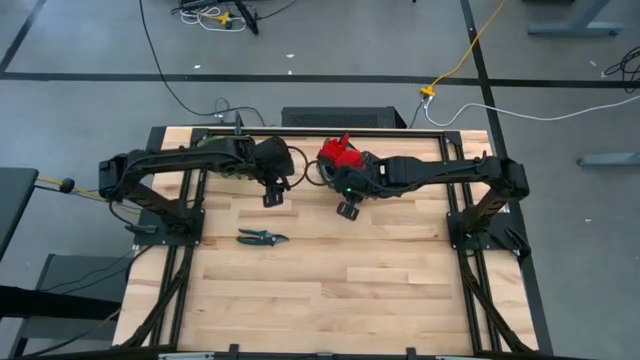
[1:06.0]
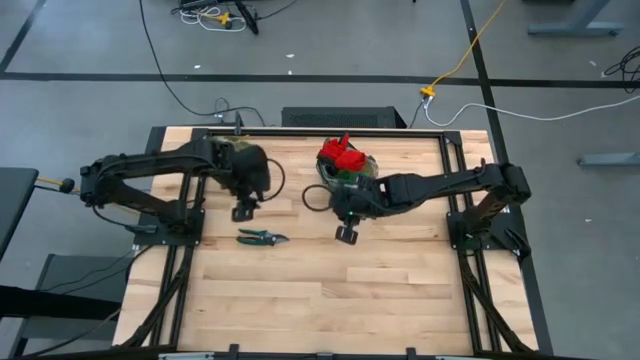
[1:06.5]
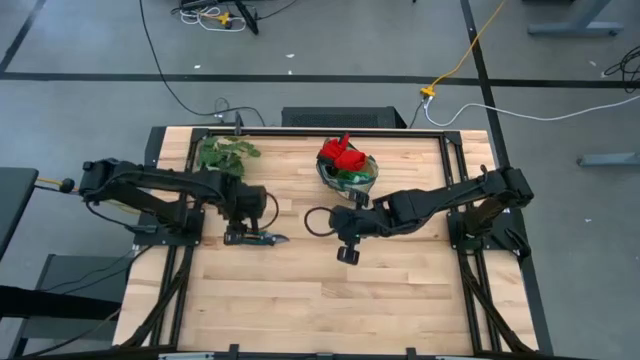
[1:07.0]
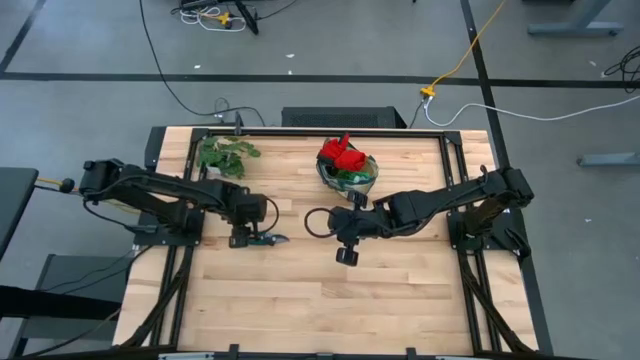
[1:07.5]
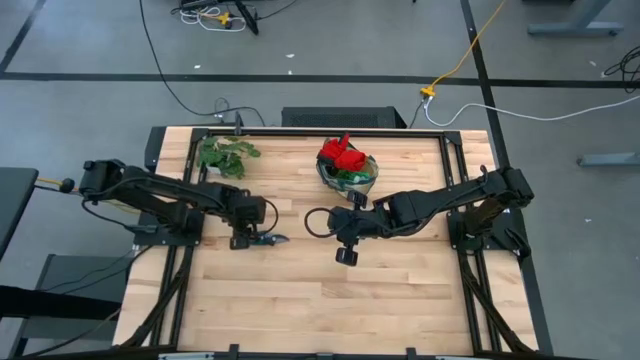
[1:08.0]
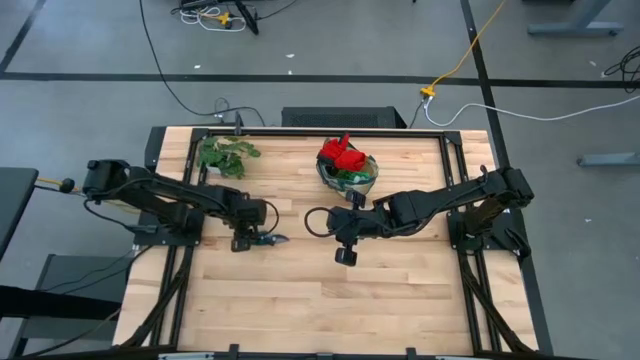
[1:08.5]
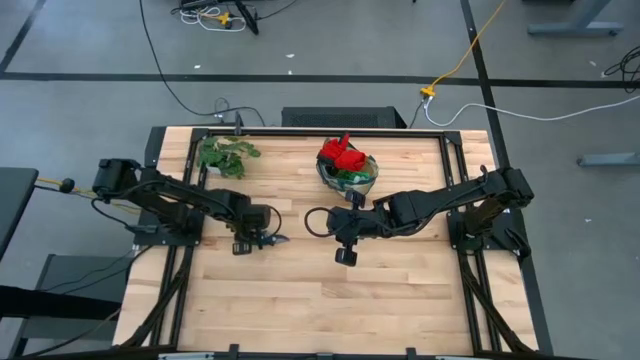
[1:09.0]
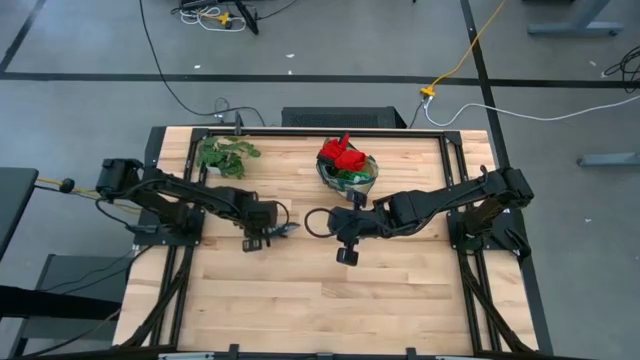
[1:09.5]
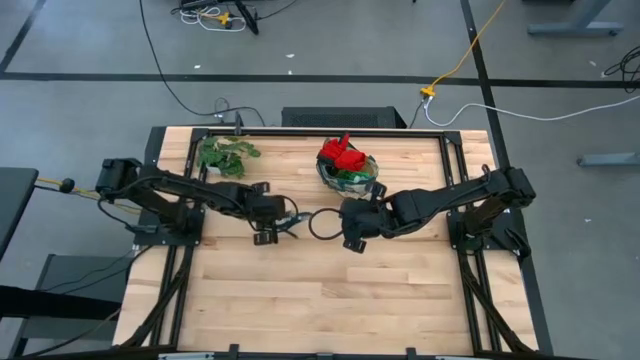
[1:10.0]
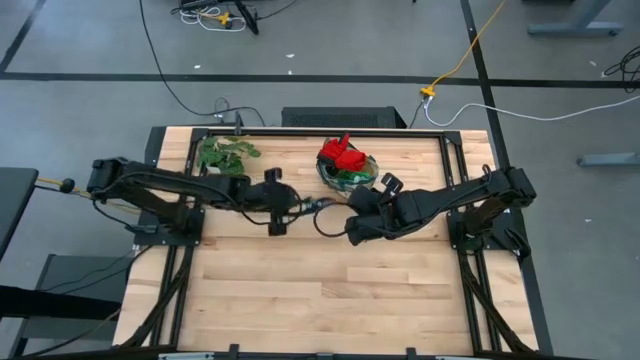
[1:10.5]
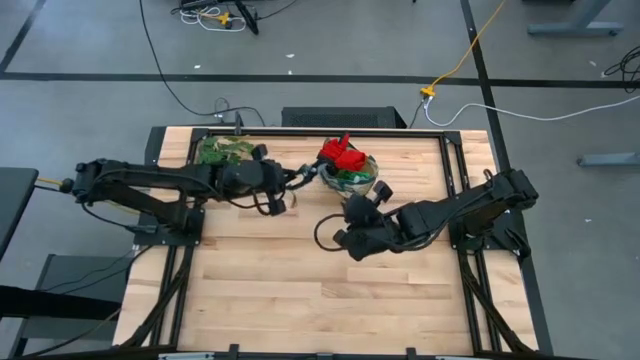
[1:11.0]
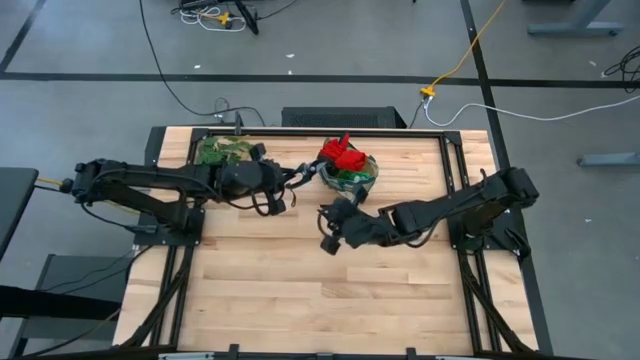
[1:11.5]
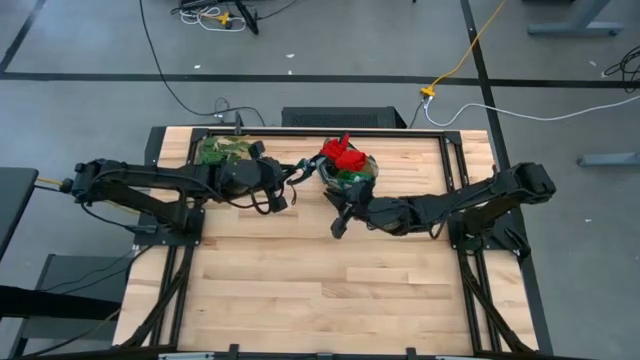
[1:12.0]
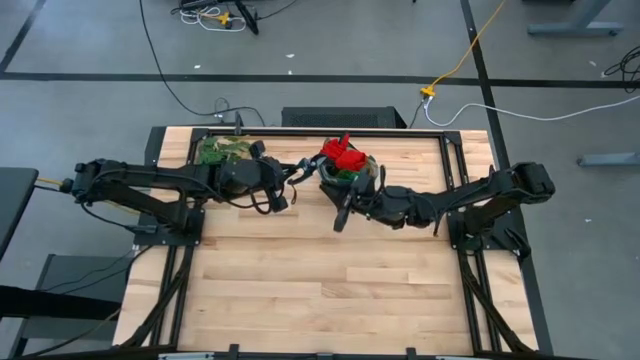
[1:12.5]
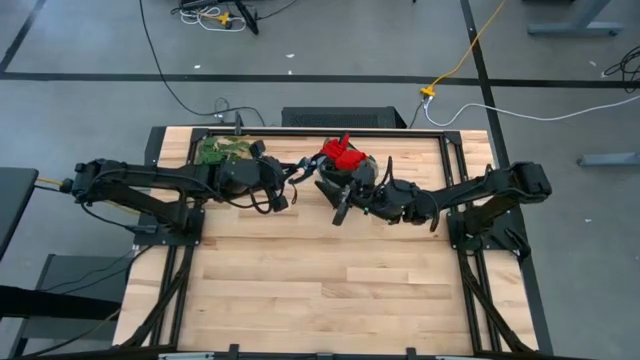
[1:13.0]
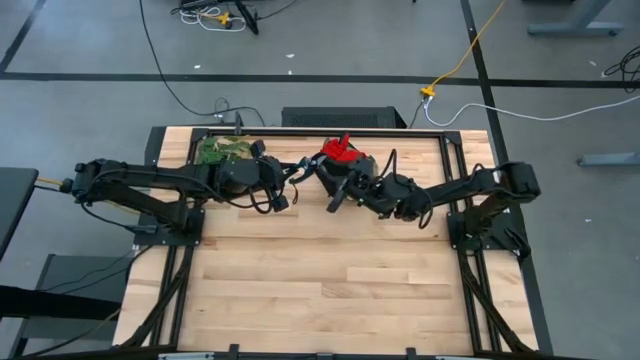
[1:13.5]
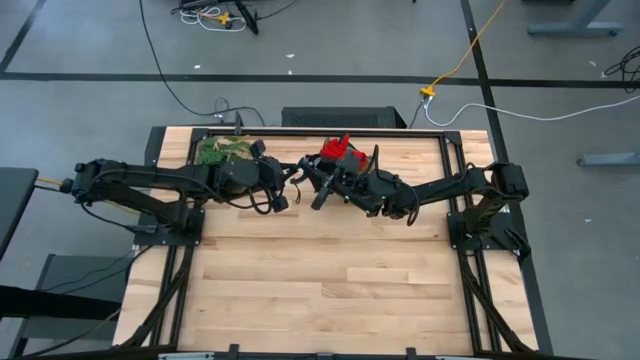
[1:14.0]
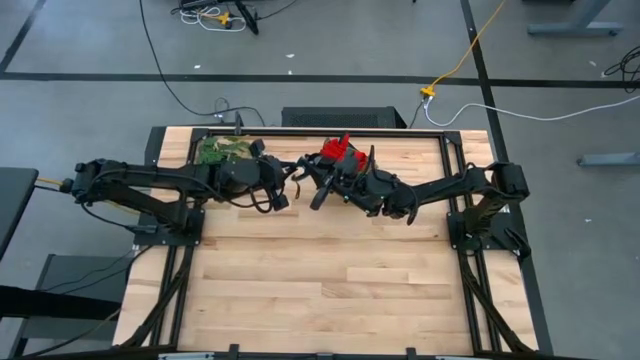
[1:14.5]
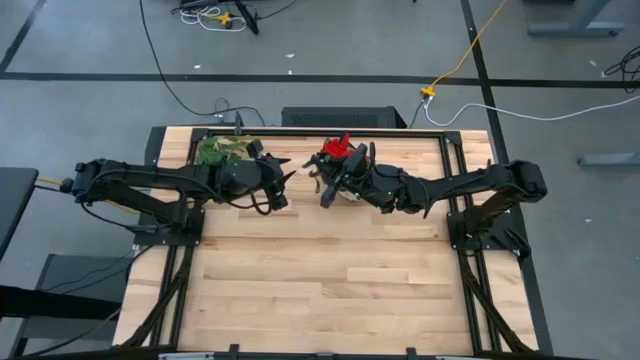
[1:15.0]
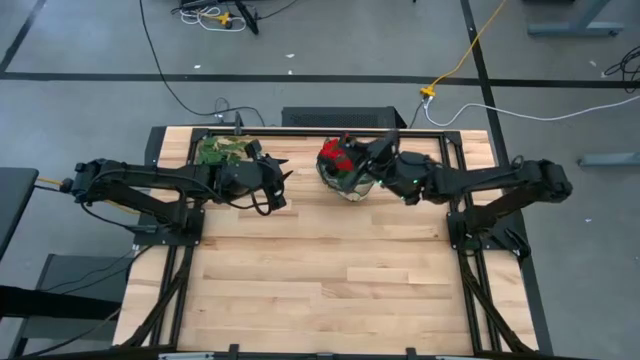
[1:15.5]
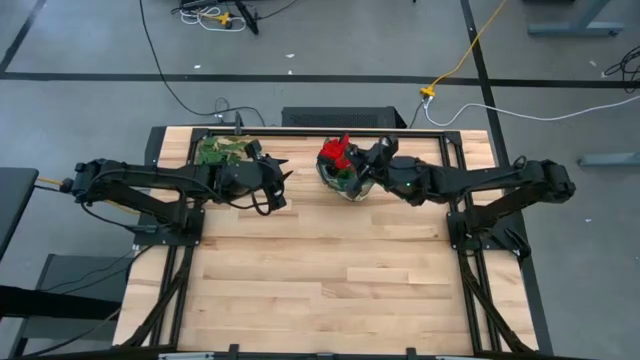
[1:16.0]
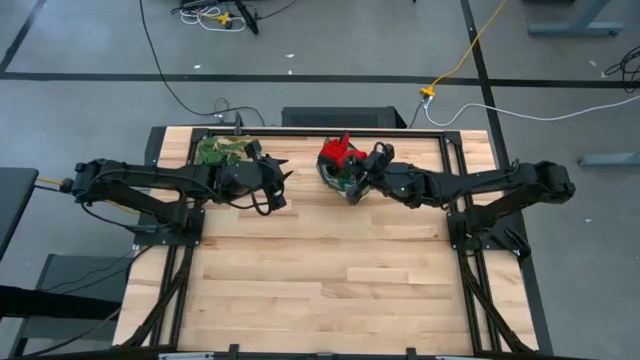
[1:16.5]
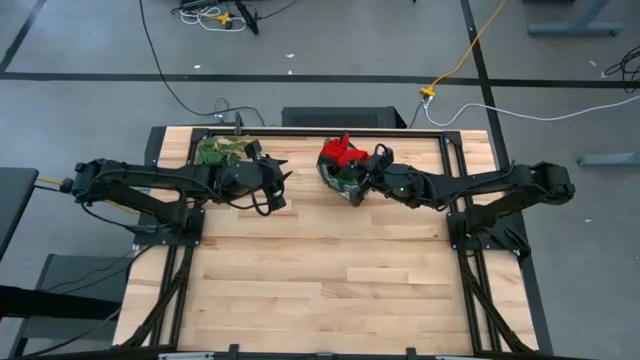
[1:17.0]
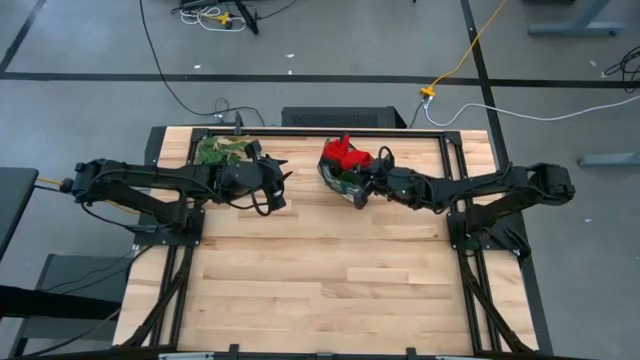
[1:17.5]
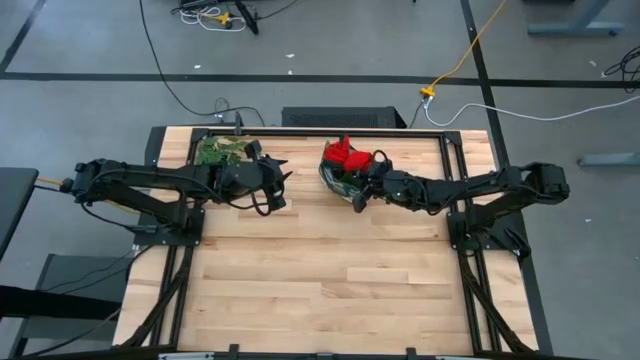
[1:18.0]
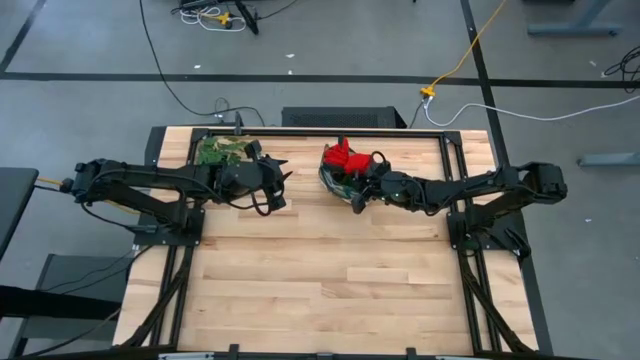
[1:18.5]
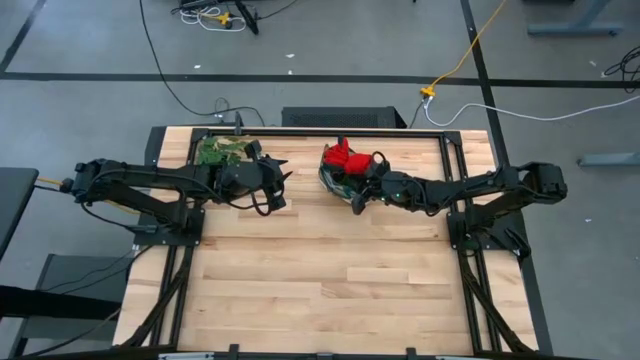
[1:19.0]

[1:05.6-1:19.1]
Task: Pick & Place Garden tools in Gardening bag
Put the dark green shear scissors into the patterned white gardening bag

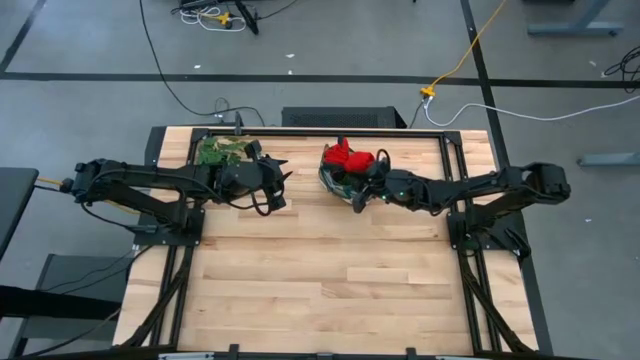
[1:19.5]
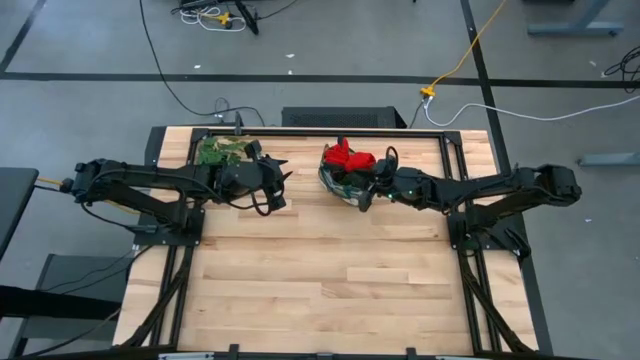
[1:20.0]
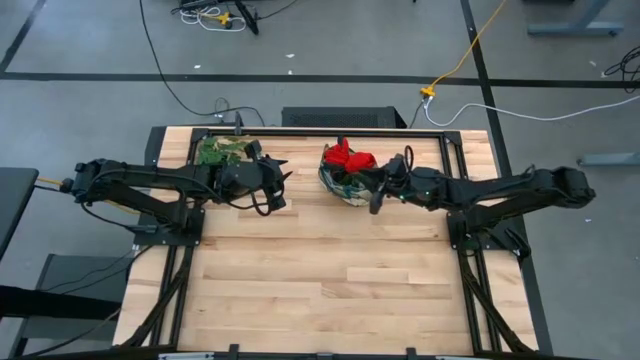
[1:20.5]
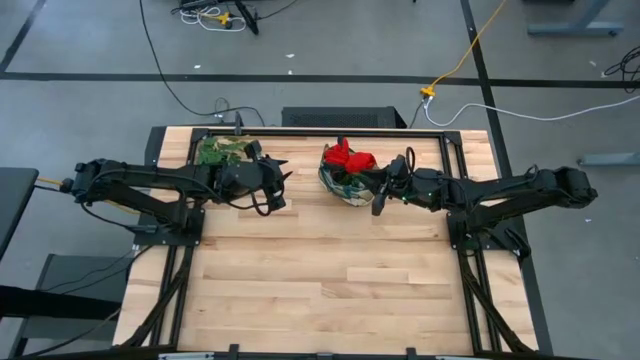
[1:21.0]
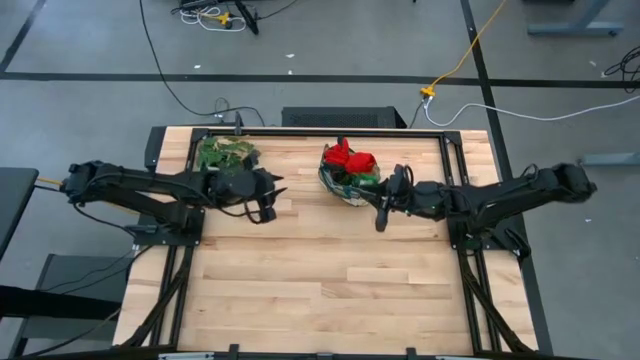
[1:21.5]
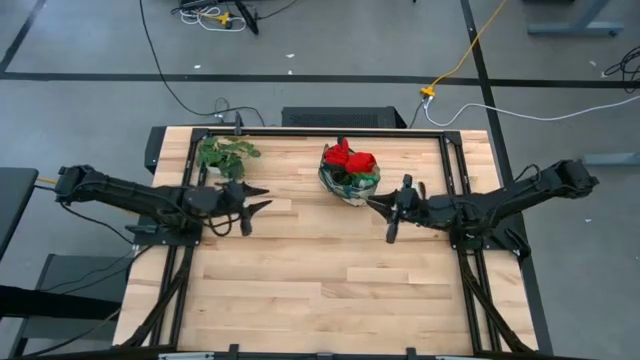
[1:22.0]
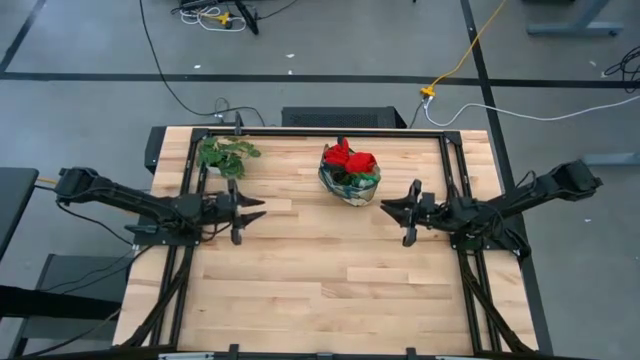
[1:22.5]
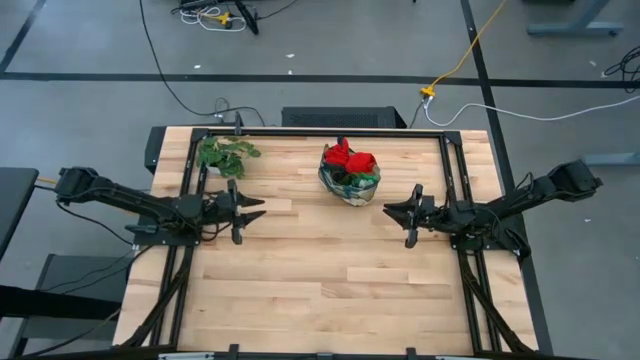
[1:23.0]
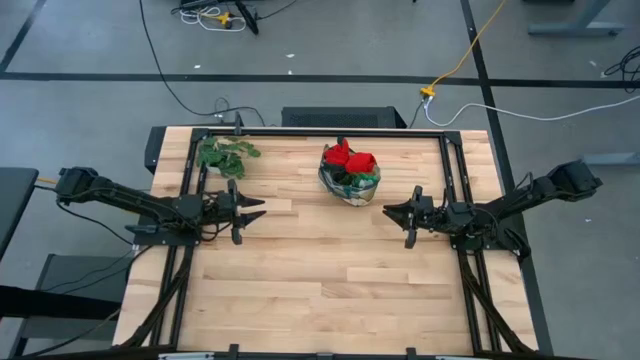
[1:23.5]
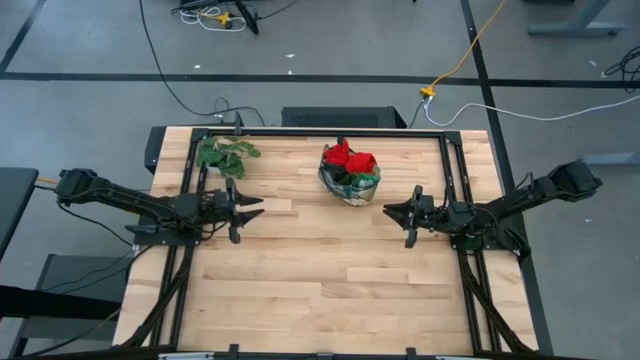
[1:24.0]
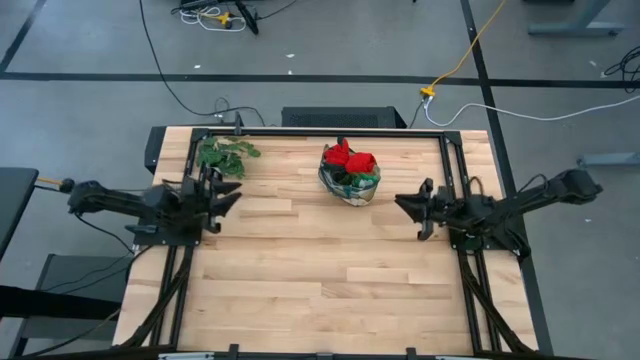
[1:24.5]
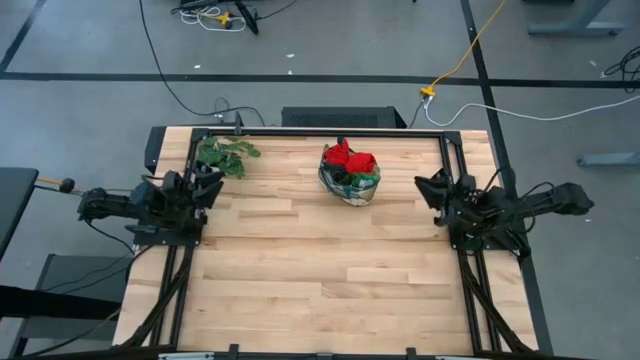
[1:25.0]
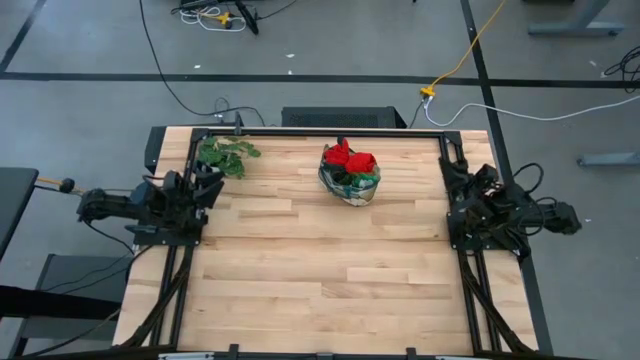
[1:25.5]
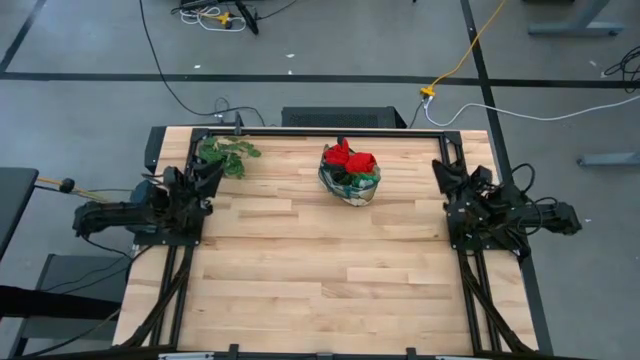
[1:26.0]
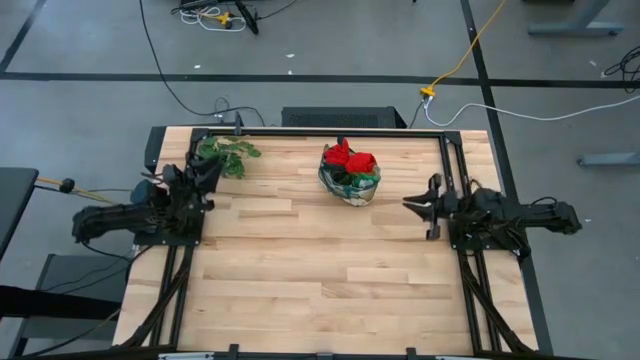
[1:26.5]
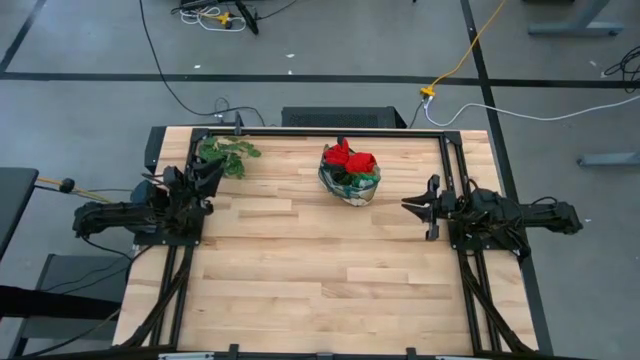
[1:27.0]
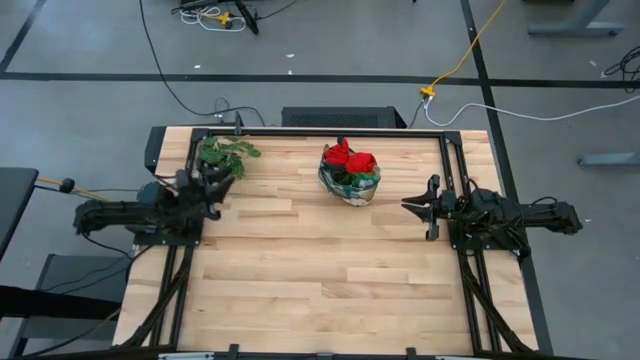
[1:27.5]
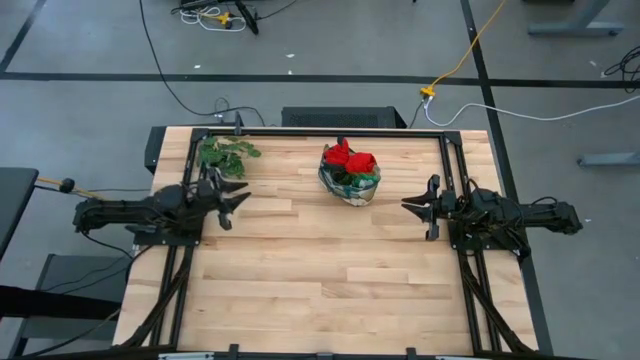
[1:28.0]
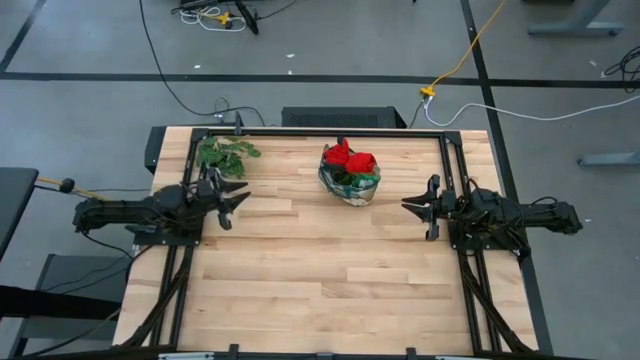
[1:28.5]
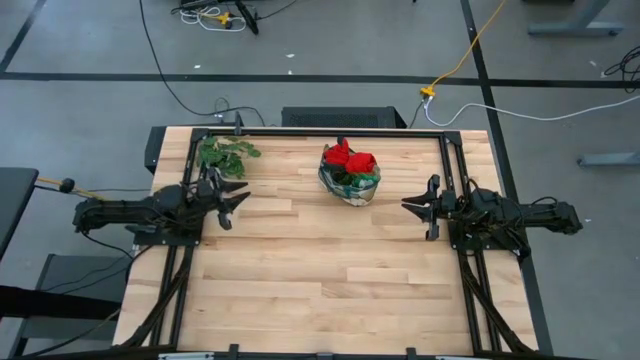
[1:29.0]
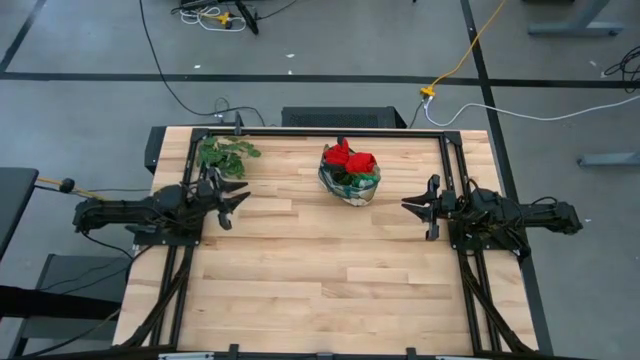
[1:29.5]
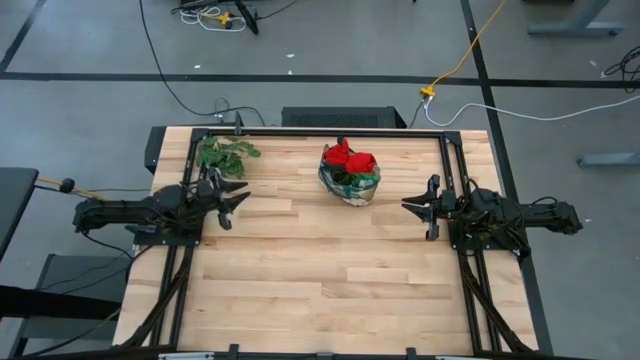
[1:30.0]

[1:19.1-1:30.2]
Return to Home Position
